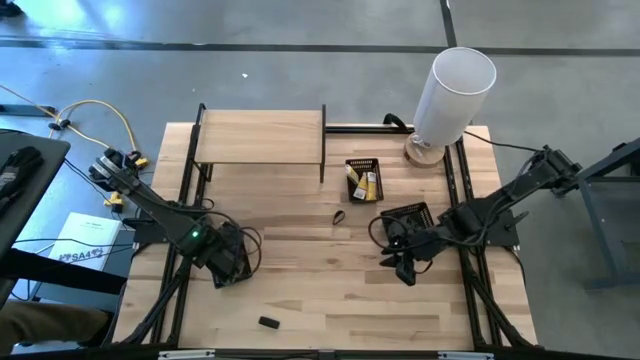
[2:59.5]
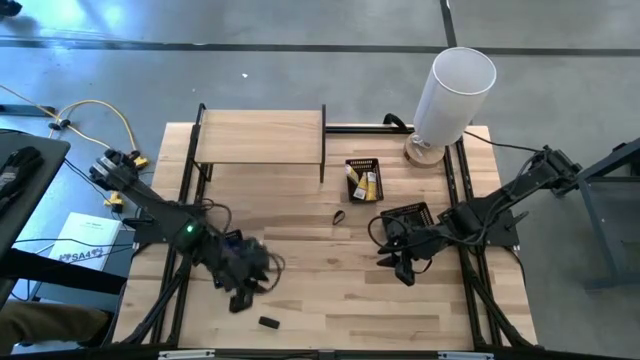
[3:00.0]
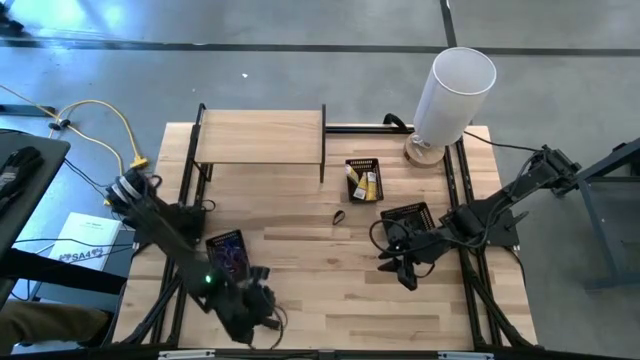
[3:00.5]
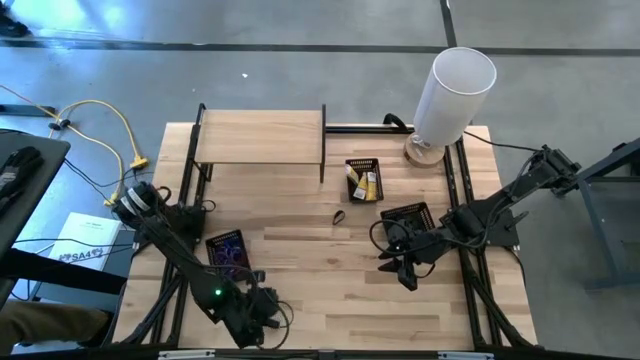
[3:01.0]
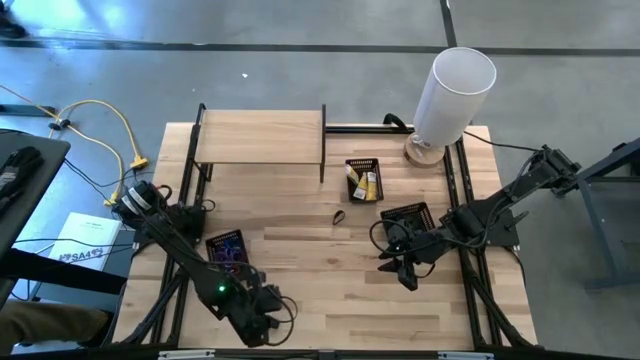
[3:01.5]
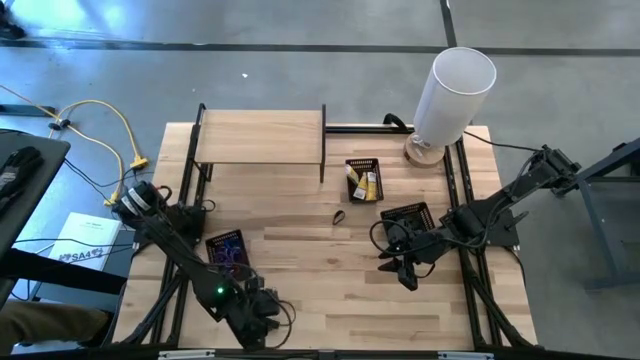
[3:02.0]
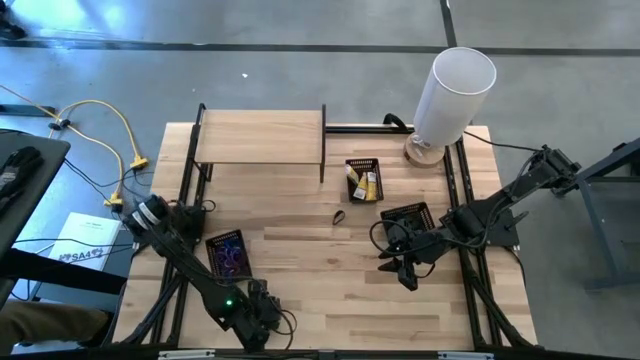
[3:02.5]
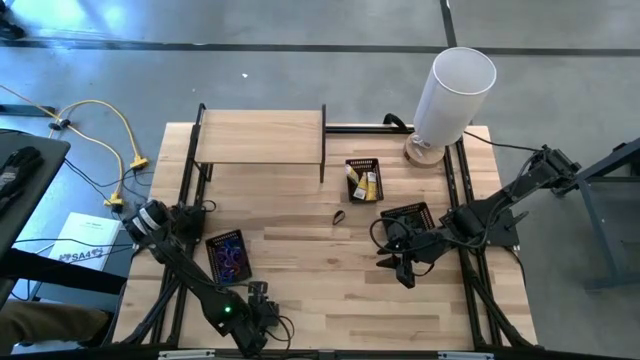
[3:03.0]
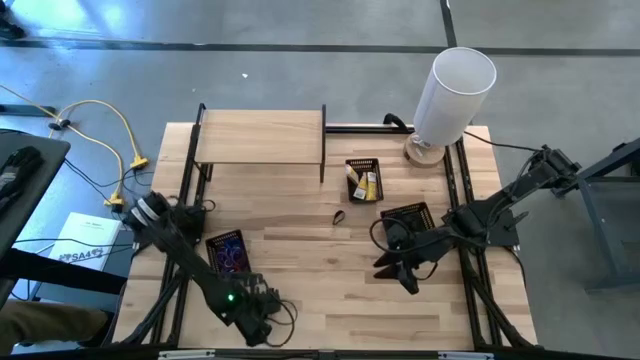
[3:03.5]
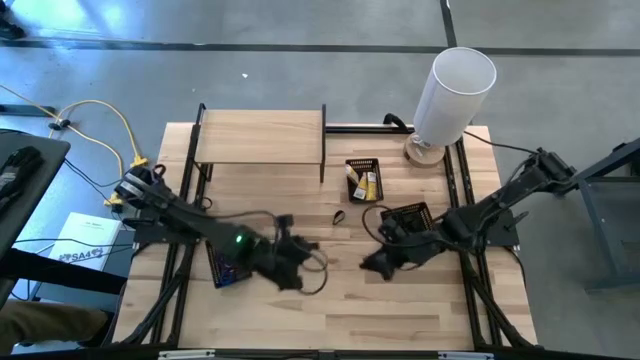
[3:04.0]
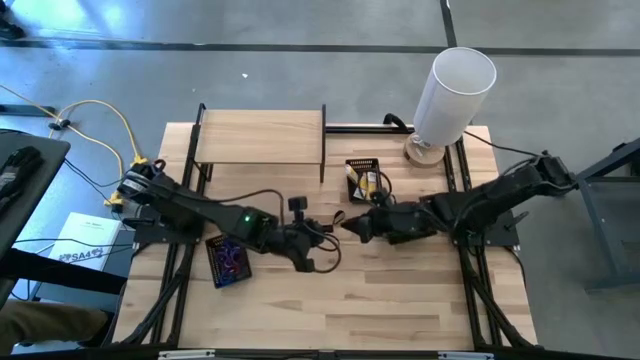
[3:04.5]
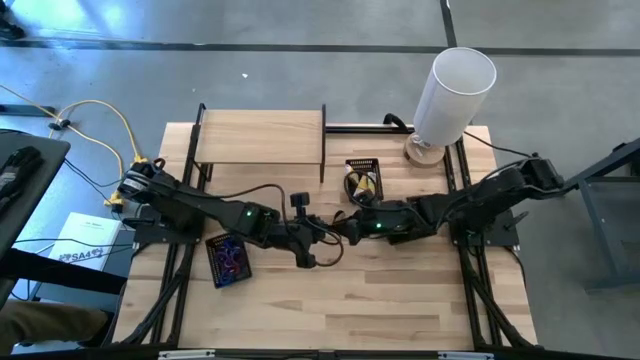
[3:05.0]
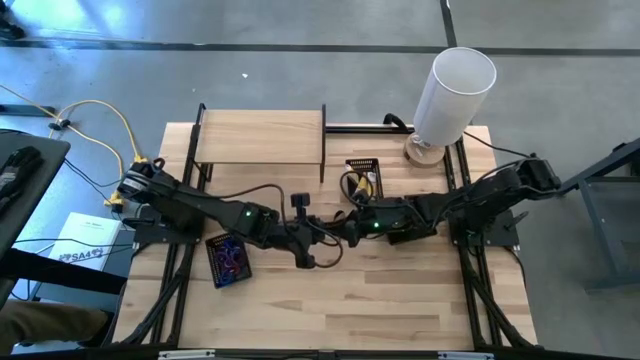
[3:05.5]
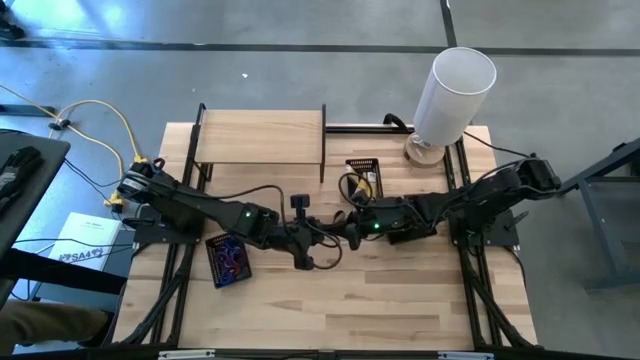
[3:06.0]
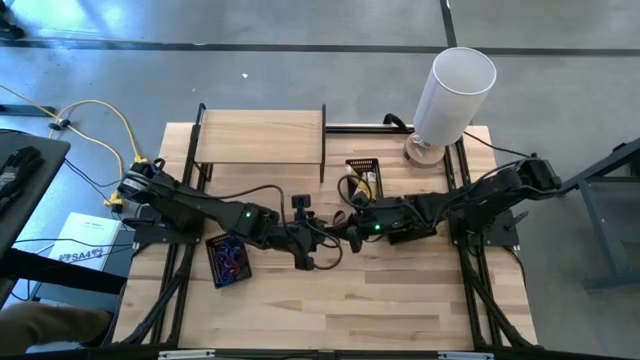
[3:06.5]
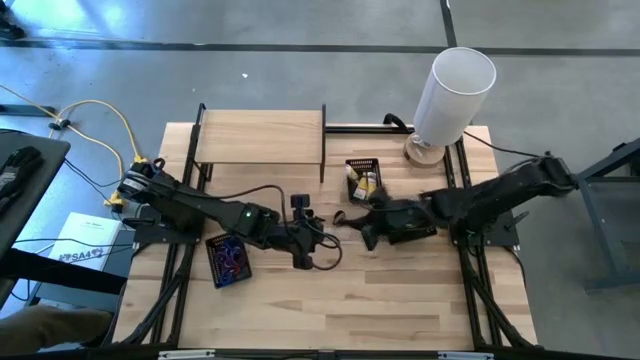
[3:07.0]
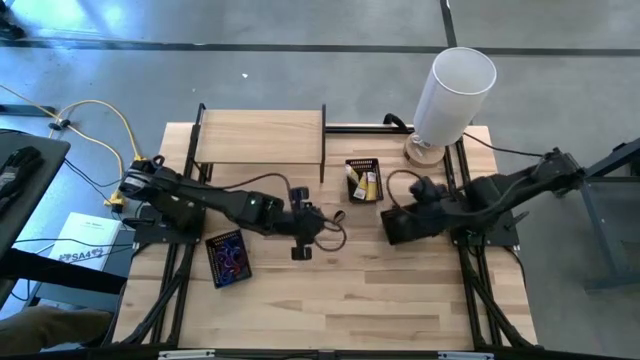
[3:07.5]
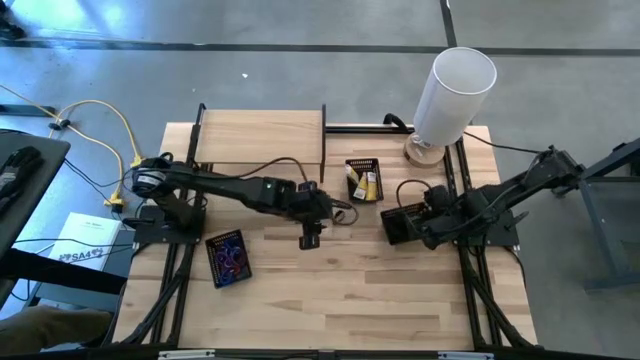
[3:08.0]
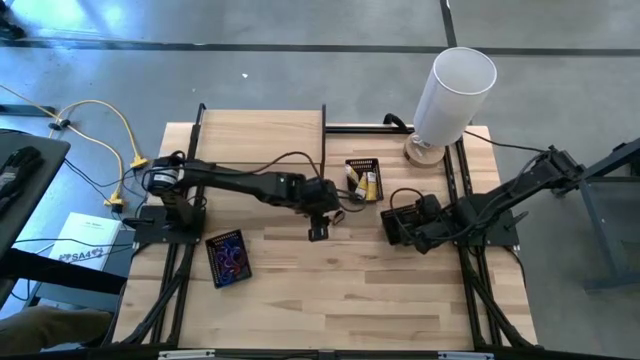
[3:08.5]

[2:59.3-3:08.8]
Task: Pick & Place Office Desk Supplies
Put the black rubberband into the bottom right black bin

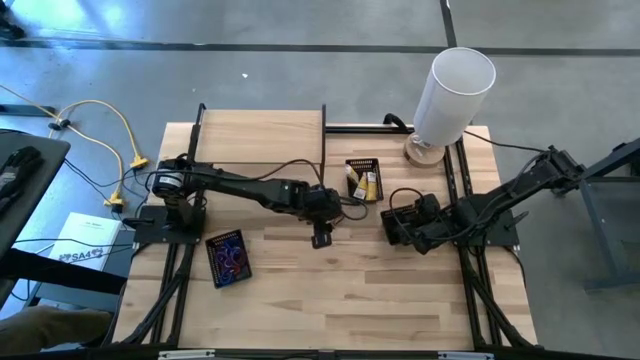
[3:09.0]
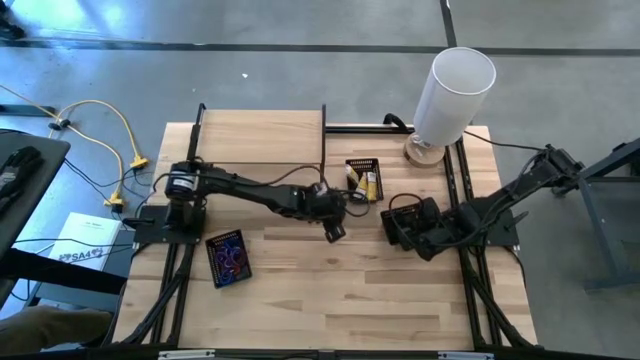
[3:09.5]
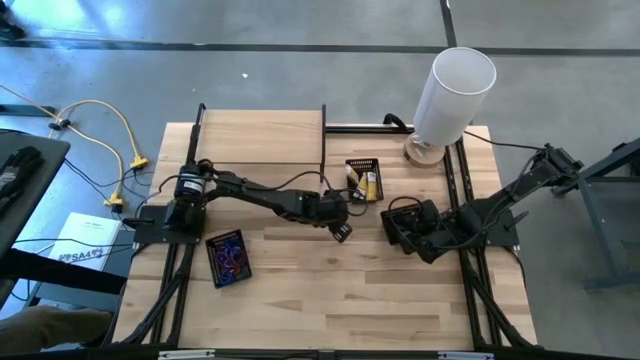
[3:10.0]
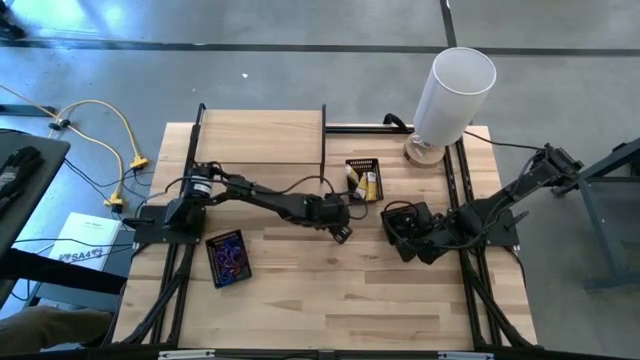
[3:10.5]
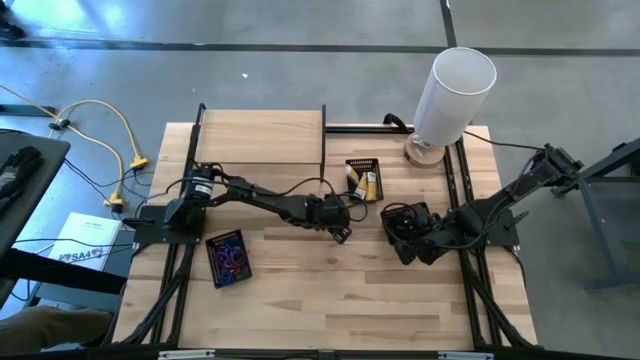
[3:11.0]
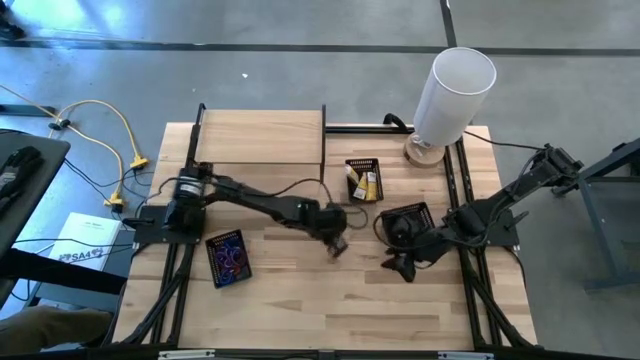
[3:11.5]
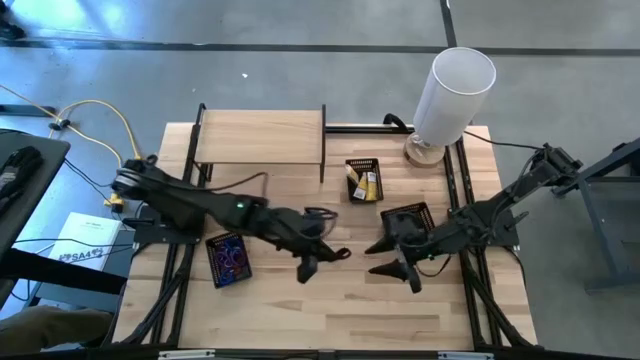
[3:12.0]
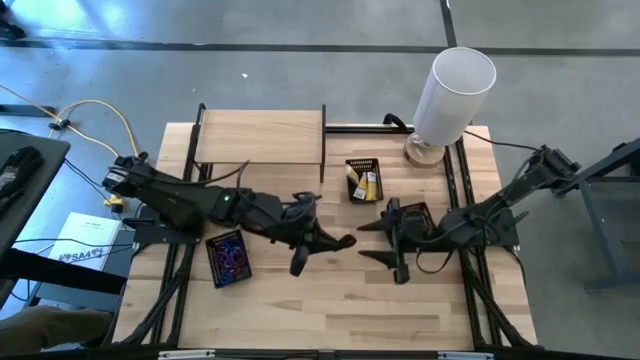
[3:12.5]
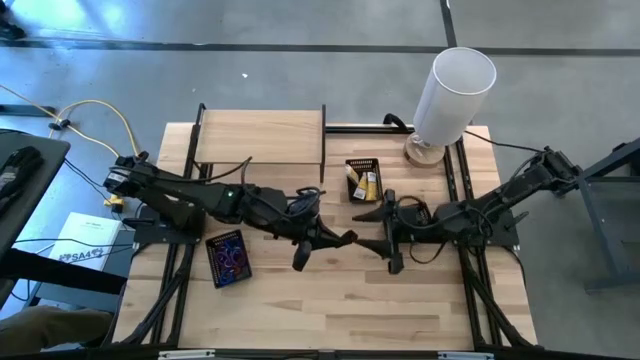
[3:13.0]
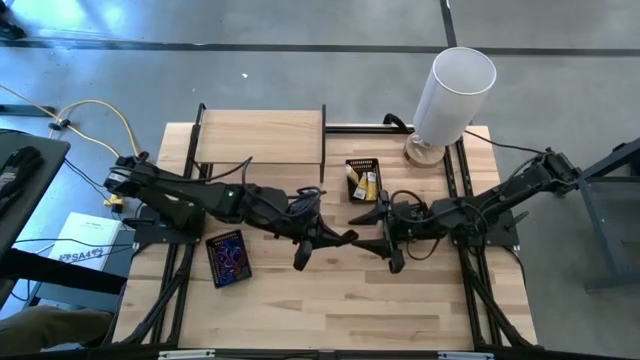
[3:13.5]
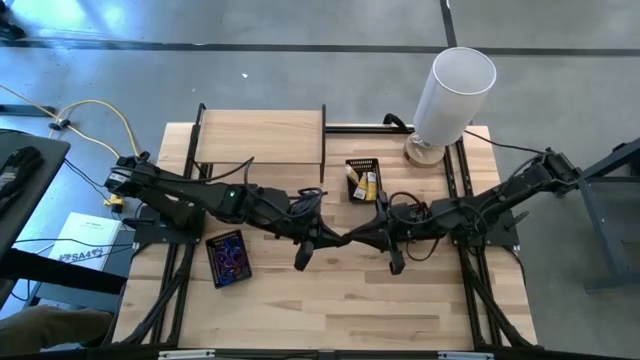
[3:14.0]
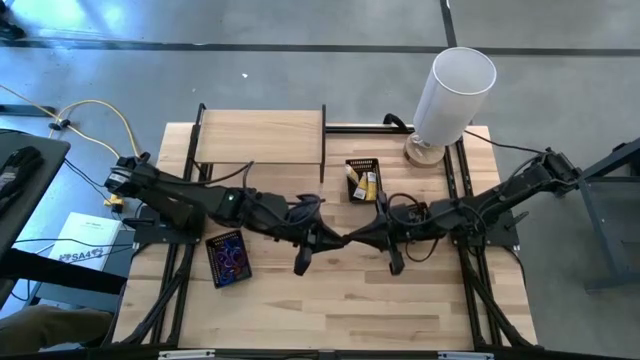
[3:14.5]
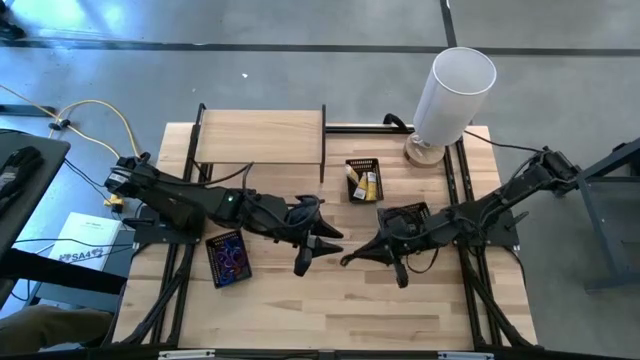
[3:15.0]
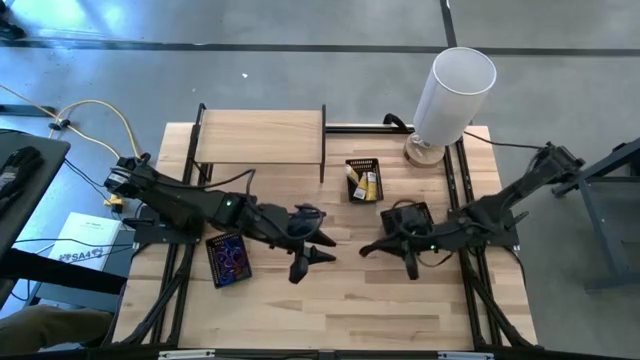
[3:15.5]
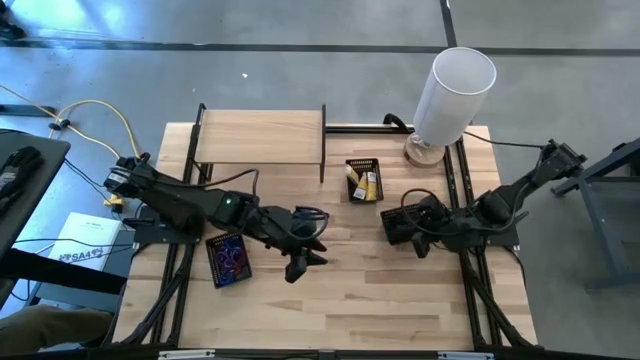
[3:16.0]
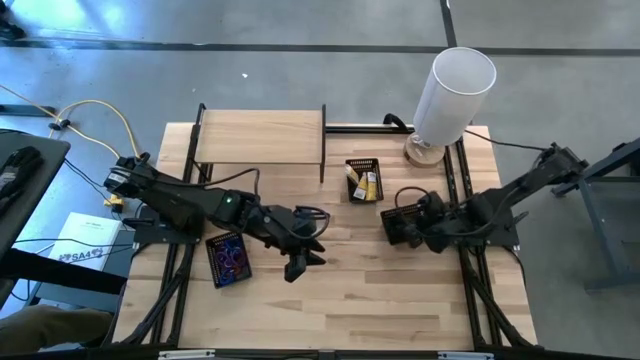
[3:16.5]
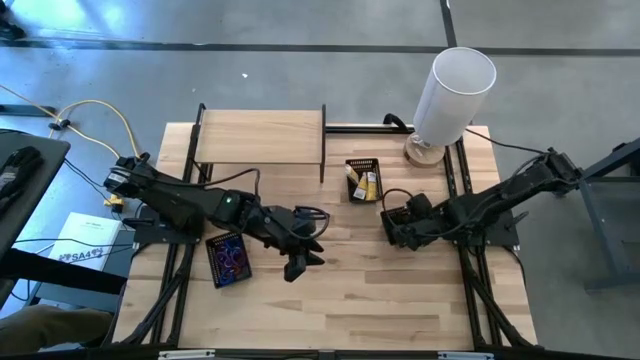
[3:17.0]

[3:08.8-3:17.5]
Put the black rubberband into the bottom right black bin

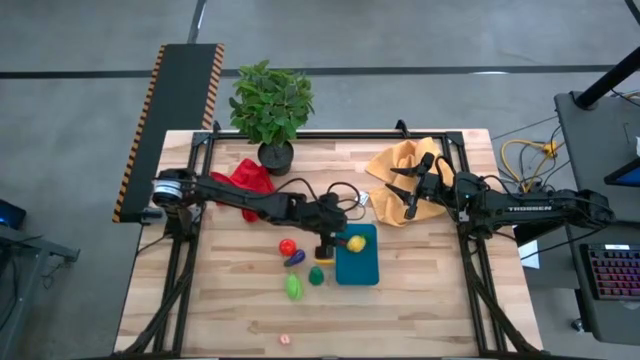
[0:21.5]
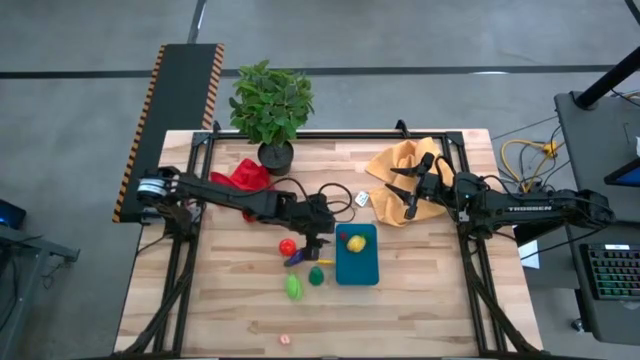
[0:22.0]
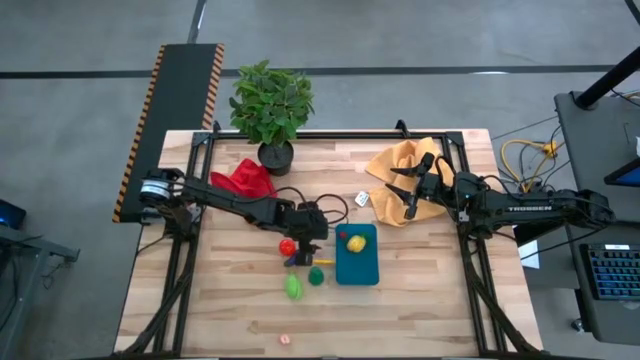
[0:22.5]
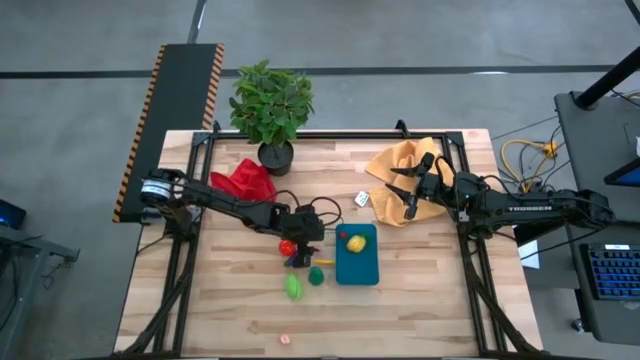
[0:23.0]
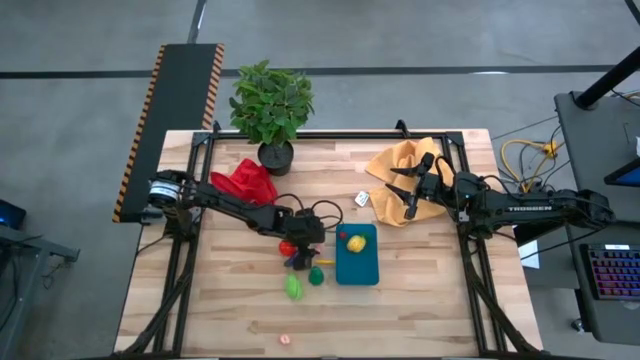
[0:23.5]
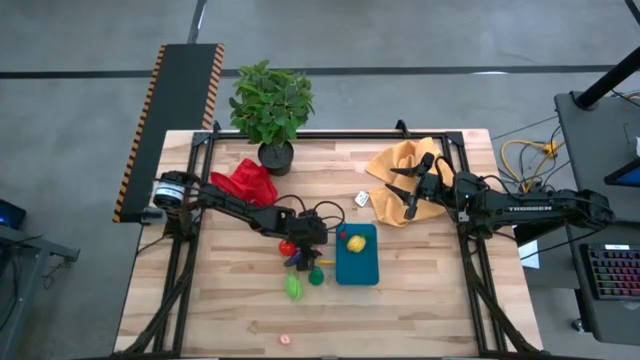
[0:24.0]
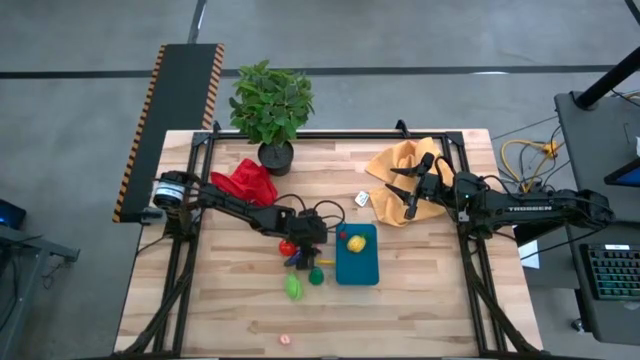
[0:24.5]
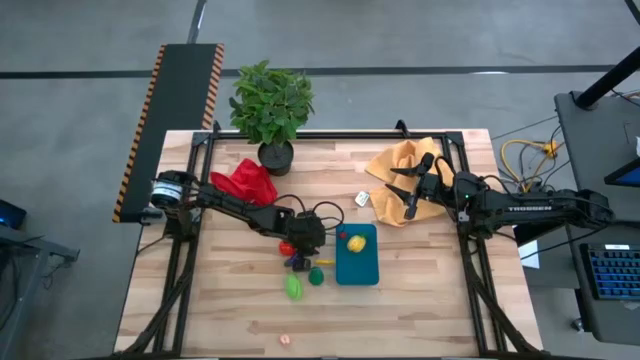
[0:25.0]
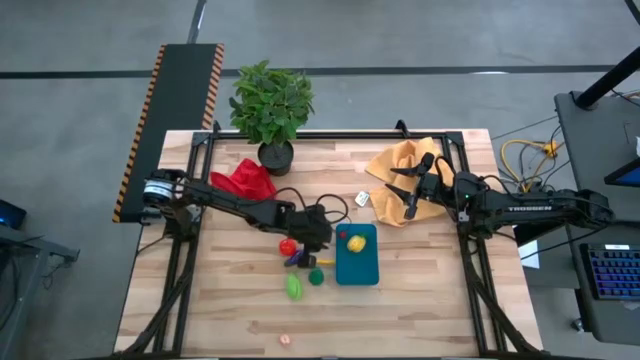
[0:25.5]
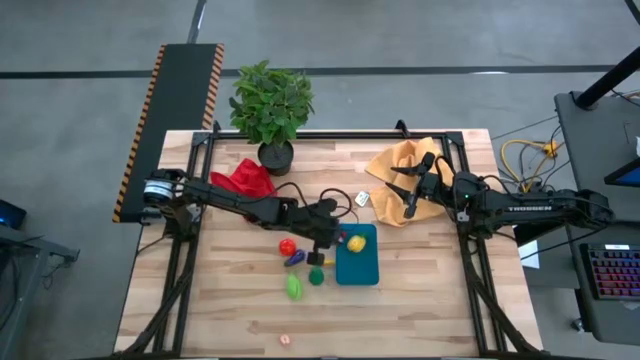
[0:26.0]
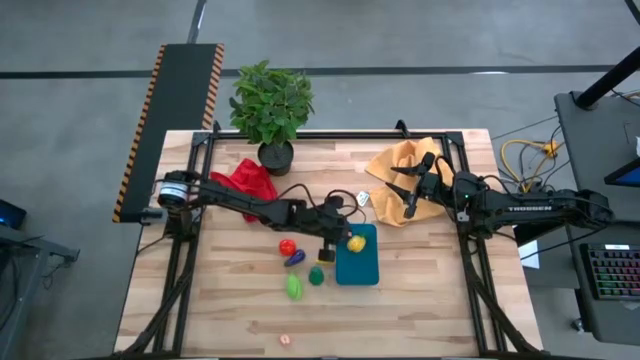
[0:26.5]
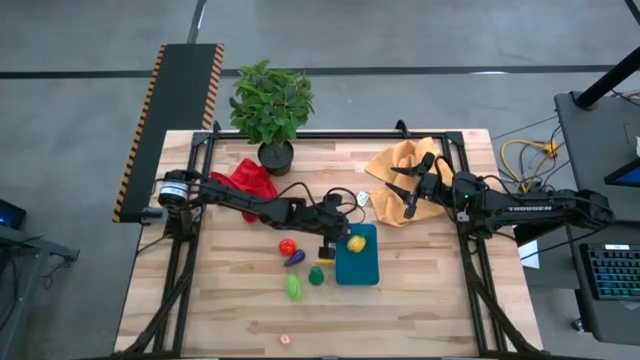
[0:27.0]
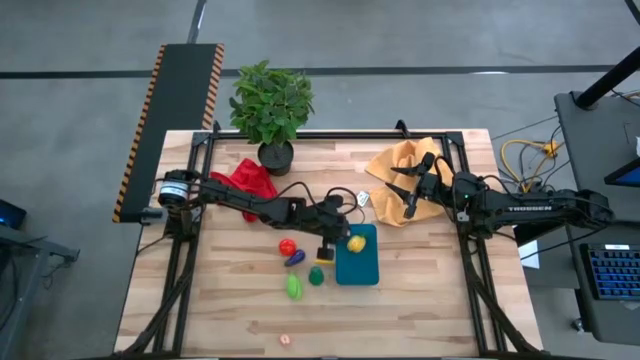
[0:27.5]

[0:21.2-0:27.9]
Task: Pick and placing Produce into tupperware
Put the pink peach into the blue bin
